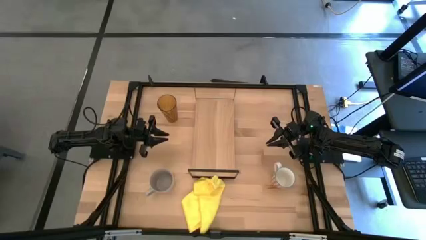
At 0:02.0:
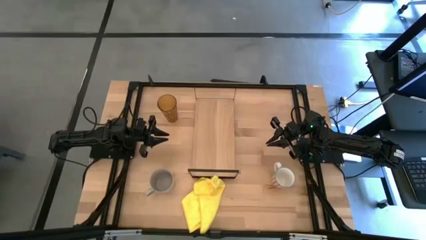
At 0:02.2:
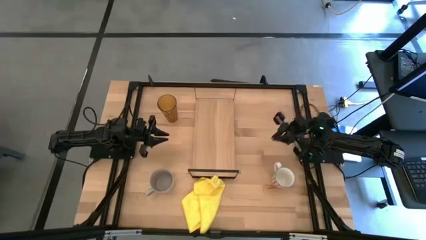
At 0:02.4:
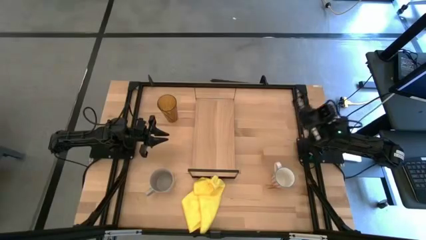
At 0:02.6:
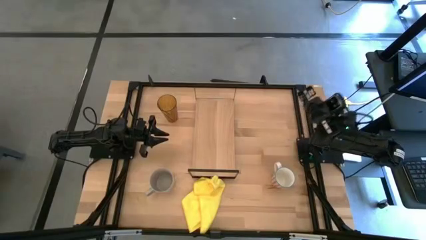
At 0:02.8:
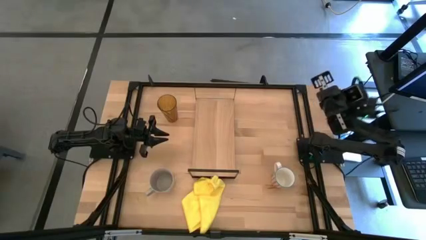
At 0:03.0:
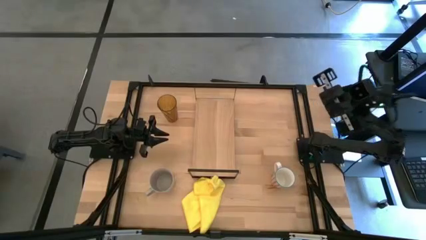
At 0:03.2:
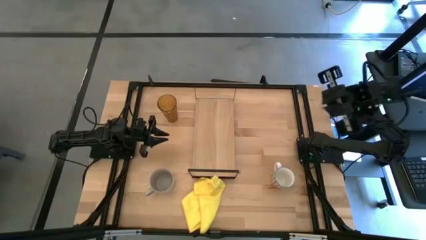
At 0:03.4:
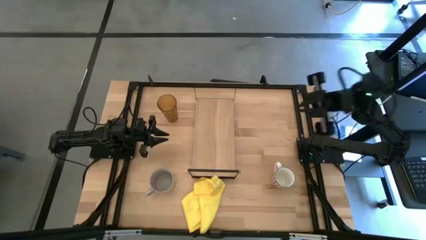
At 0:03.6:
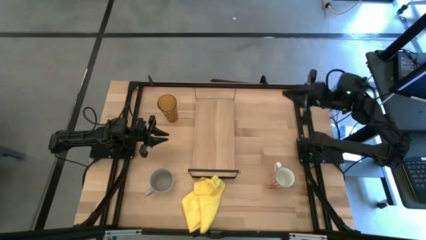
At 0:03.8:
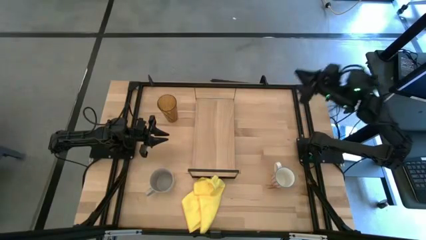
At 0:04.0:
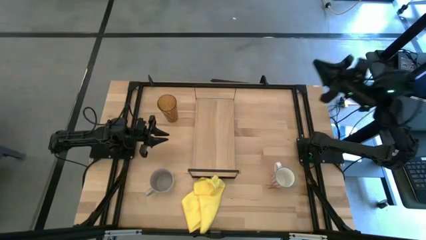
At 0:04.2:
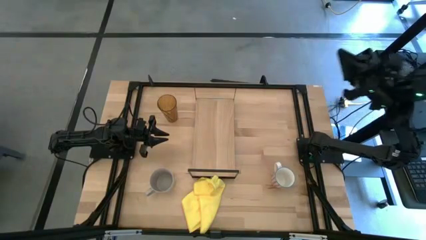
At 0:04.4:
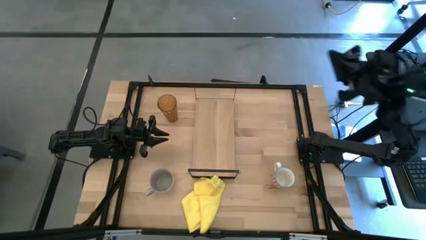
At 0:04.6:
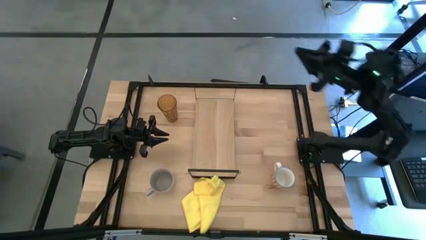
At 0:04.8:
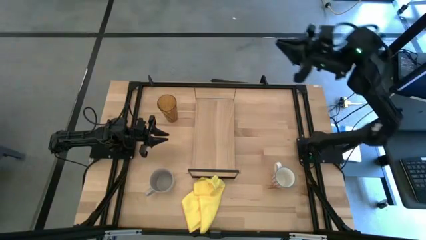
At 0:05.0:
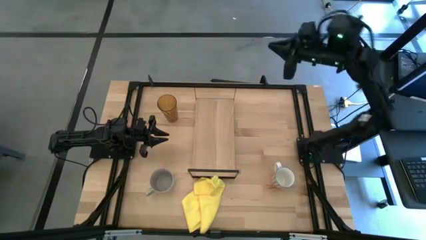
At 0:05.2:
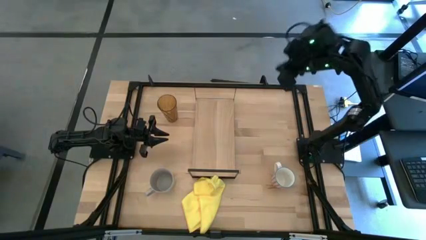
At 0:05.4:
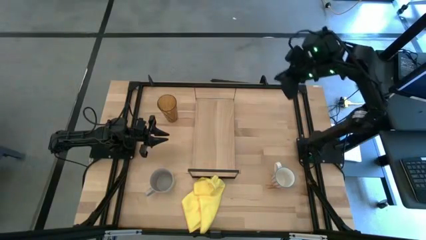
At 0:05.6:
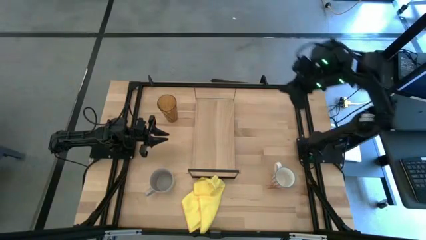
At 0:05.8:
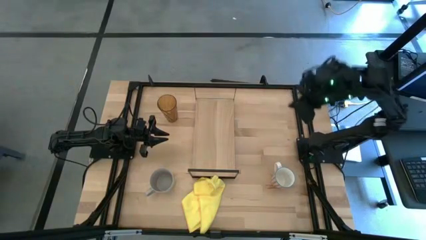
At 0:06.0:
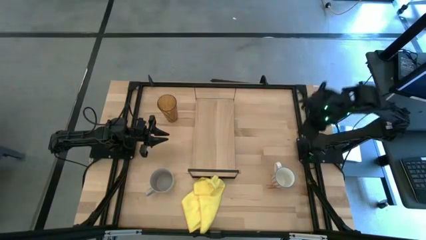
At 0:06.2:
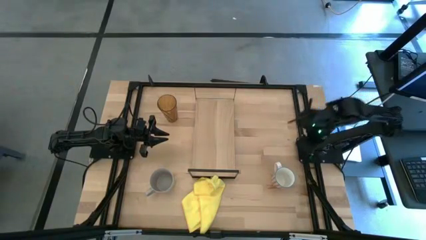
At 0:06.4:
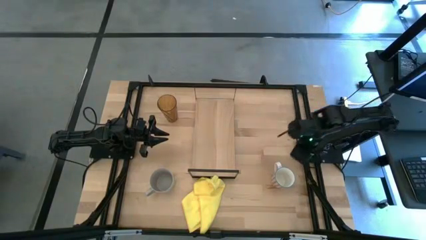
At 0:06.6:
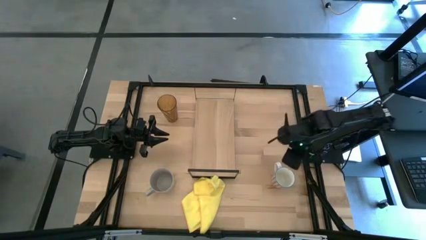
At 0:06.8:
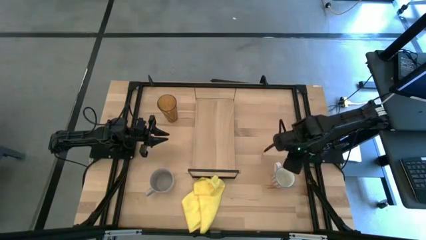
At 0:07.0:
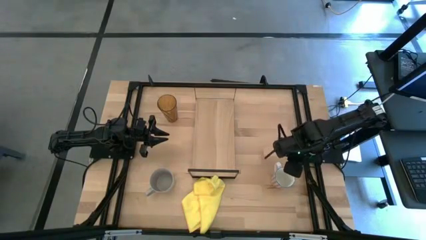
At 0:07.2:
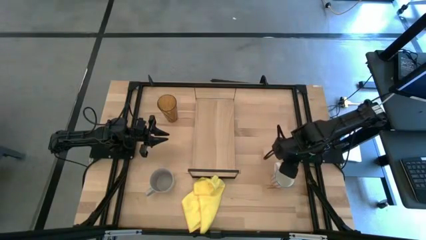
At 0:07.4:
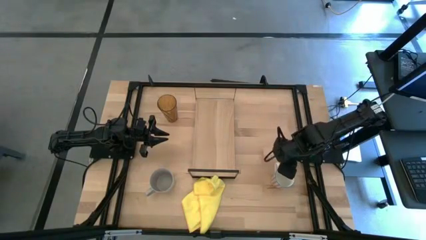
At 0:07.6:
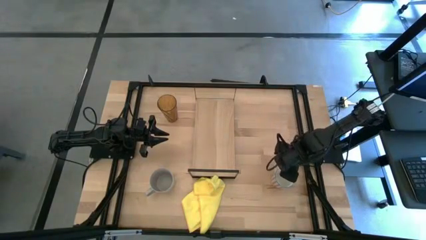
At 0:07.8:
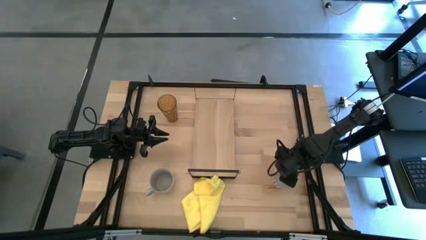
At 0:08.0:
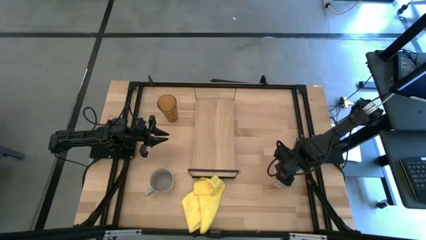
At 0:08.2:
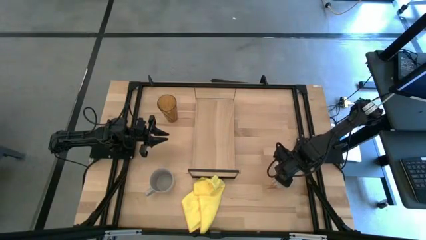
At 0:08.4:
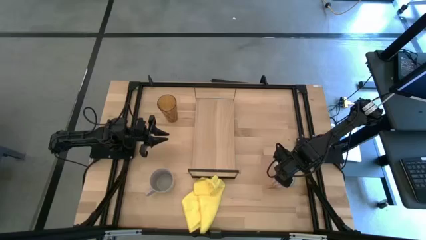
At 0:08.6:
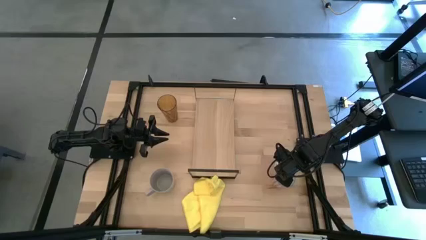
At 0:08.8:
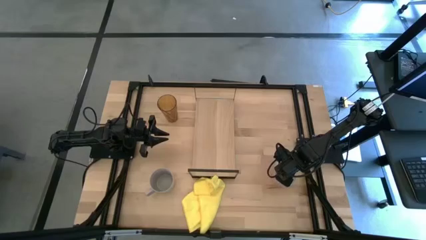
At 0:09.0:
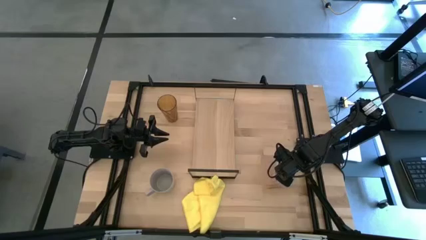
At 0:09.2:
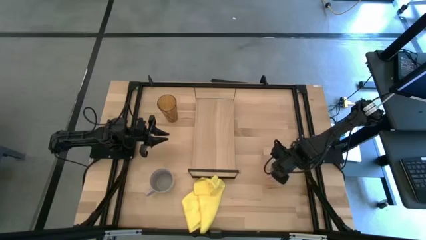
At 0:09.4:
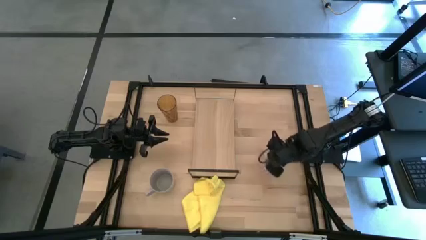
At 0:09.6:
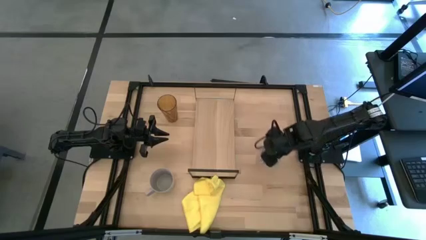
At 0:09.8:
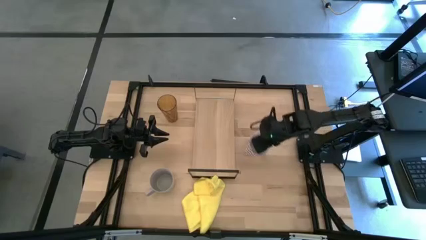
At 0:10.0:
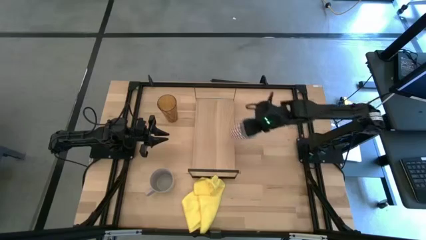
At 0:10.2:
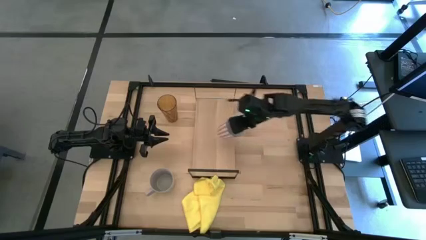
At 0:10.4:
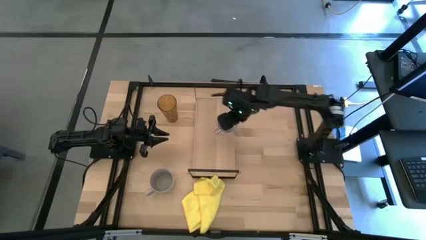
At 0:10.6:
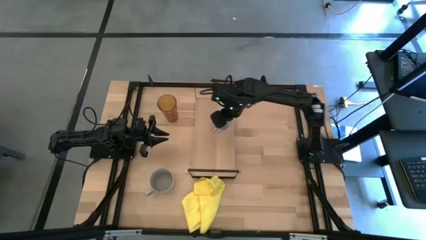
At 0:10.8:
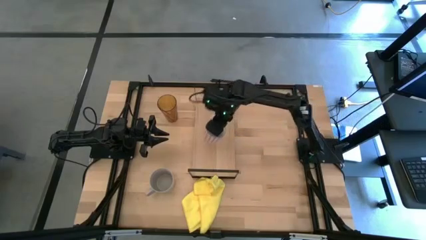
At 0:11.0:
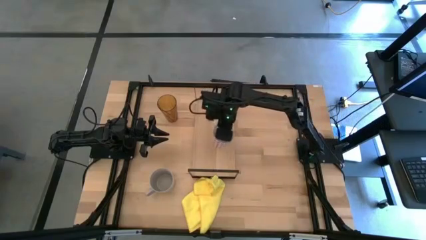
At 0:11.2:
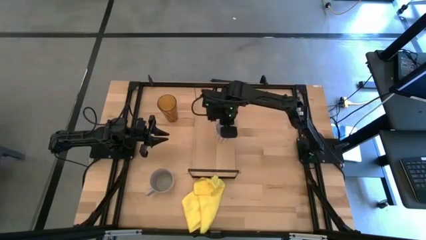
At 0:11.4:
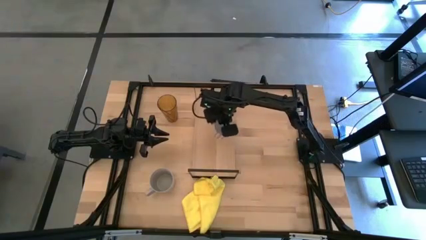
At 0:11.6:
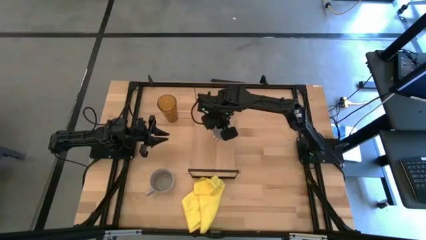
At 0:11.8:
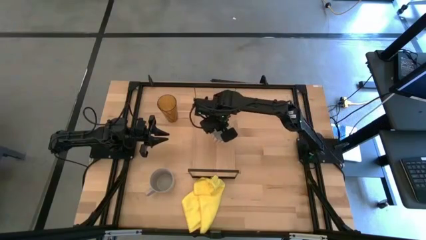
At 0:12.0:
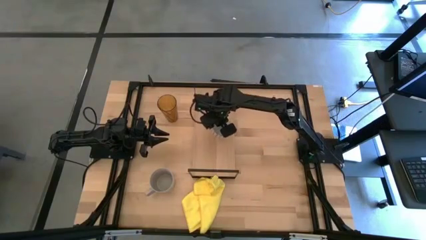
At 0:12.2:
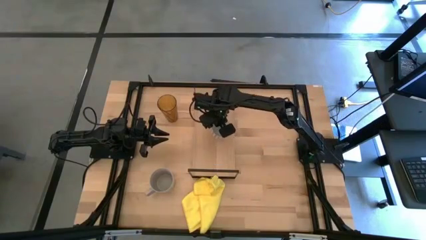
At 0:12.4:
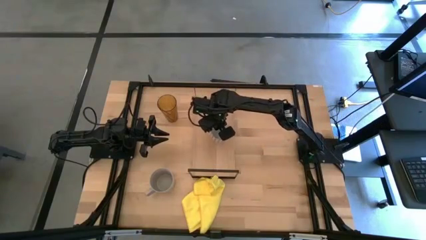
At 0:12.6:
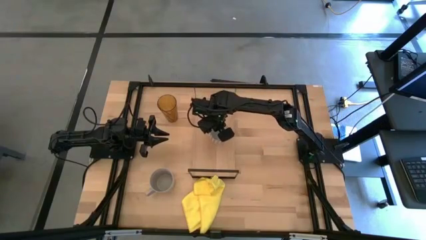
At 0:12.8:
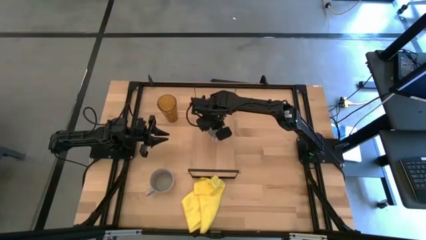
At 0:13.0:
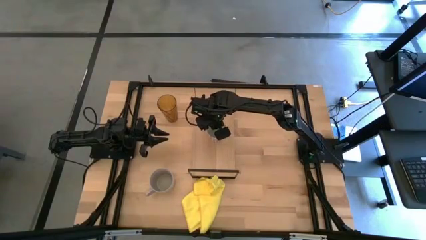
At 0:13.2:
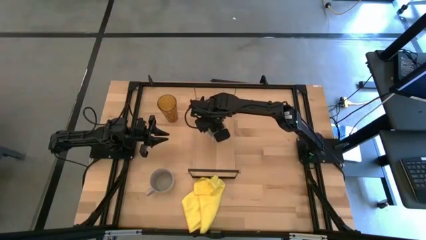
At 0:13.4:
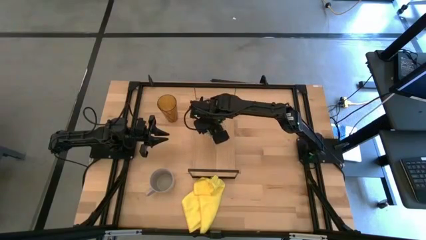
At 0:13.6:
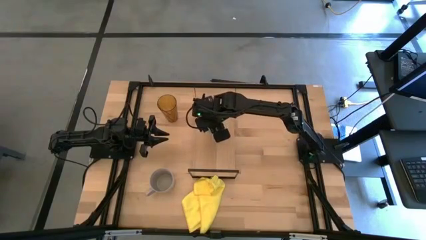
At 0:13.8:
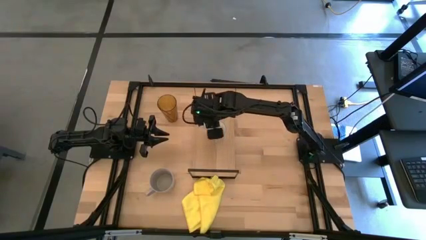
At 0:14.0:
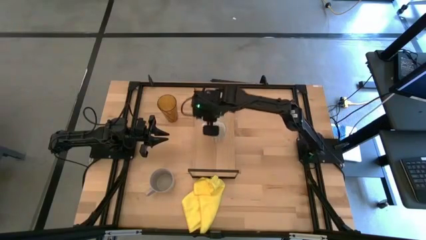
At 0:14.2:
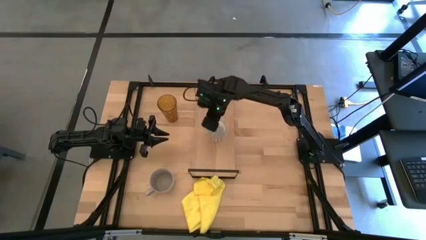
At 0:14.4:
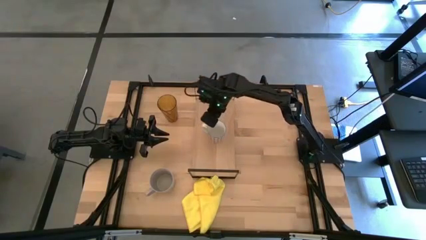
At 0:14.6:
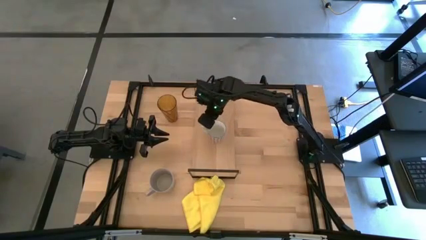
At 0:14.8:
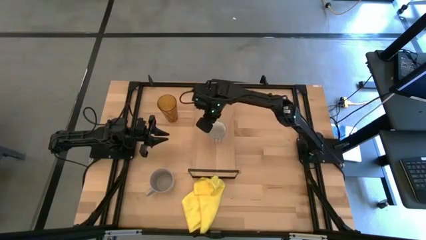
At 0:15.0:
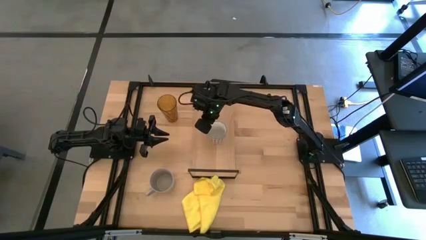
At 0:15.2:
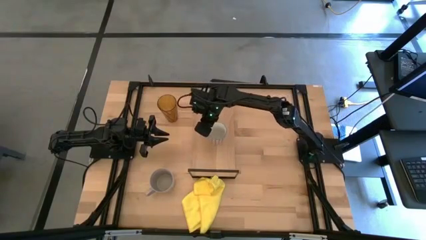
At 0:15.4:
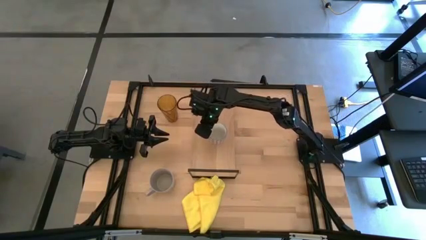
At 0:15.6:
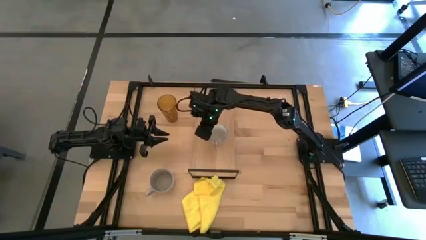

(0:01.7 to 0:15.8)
Task: Stack small to large cups/mugs on shelf
Put the red patterned mug on the shelf
